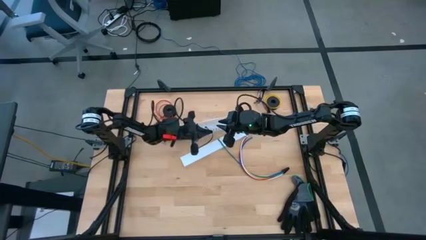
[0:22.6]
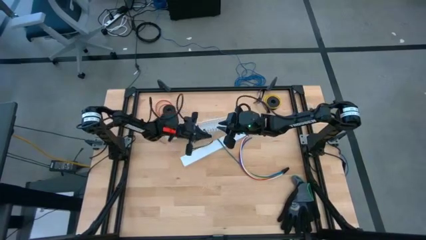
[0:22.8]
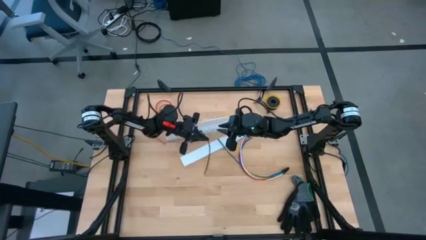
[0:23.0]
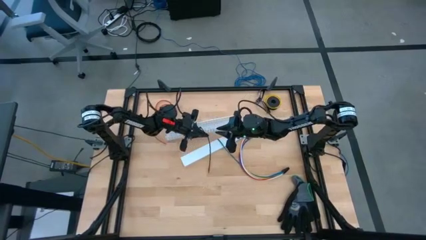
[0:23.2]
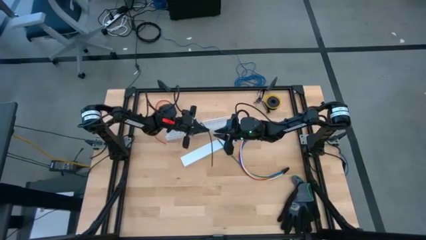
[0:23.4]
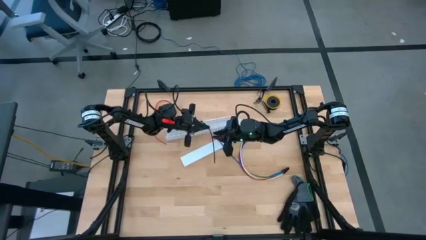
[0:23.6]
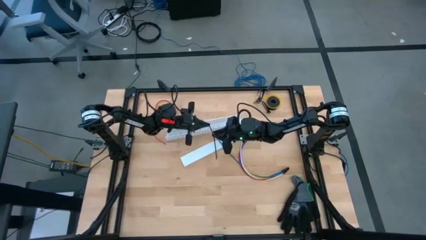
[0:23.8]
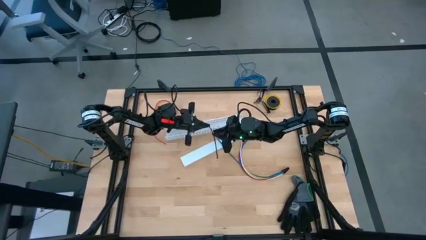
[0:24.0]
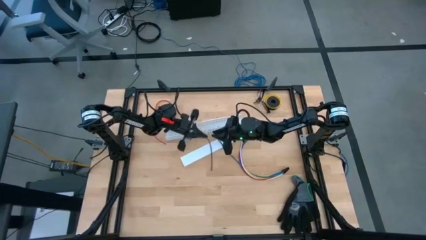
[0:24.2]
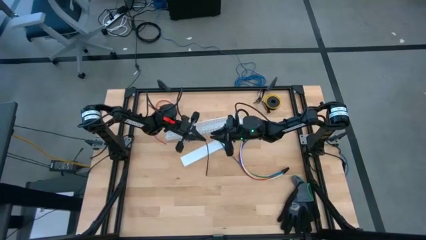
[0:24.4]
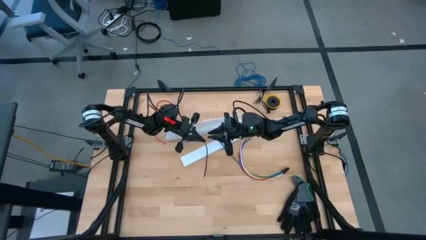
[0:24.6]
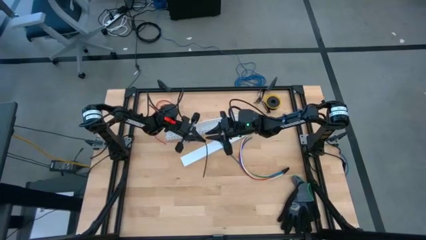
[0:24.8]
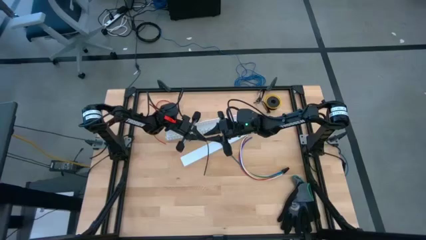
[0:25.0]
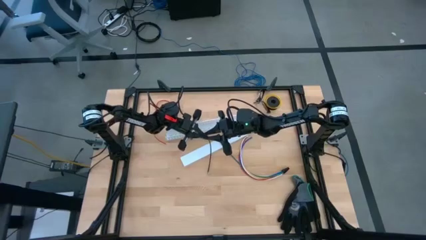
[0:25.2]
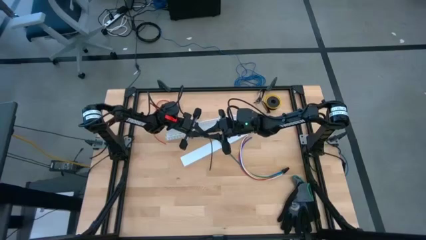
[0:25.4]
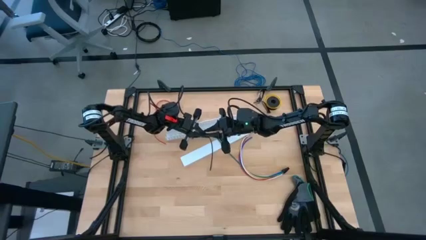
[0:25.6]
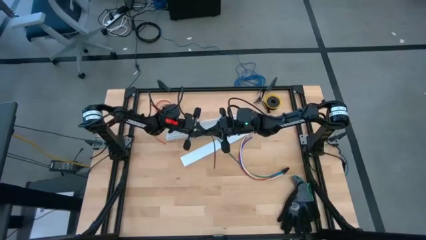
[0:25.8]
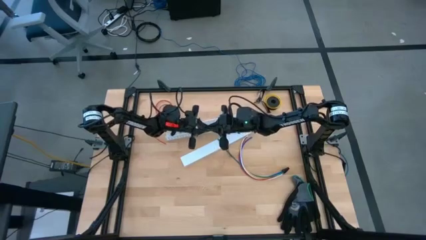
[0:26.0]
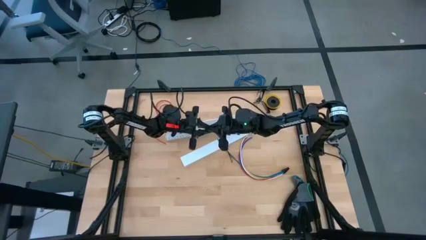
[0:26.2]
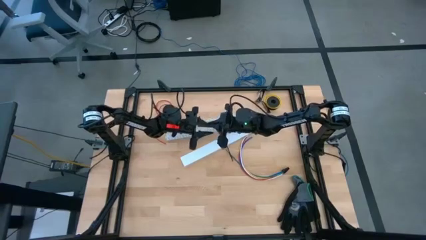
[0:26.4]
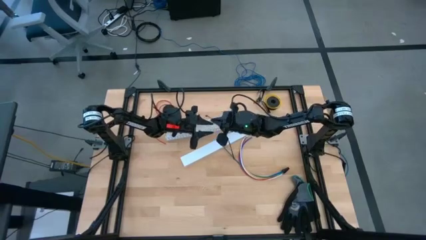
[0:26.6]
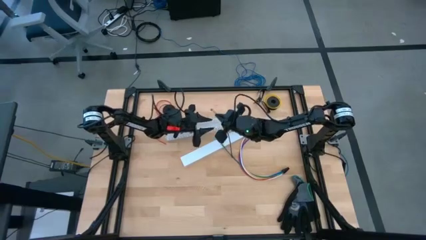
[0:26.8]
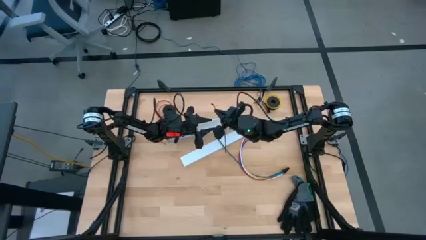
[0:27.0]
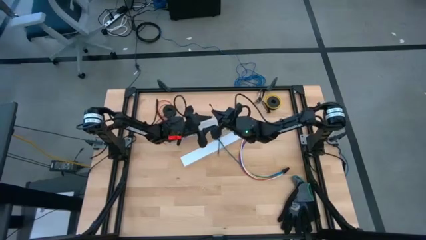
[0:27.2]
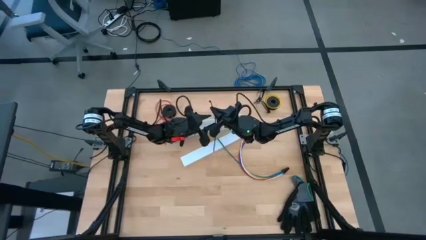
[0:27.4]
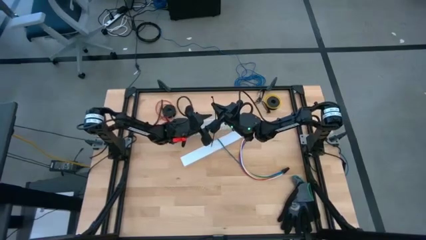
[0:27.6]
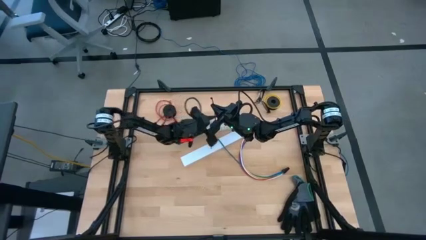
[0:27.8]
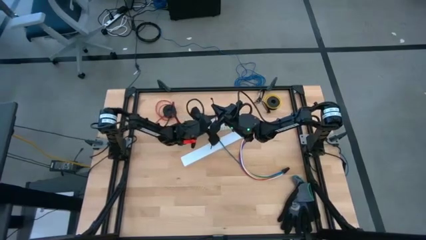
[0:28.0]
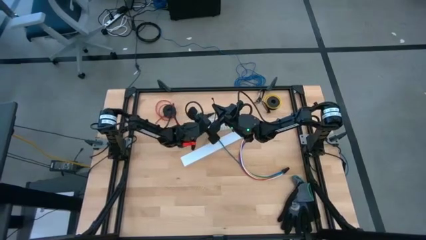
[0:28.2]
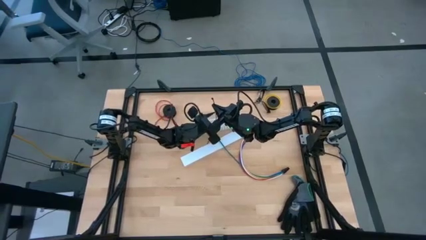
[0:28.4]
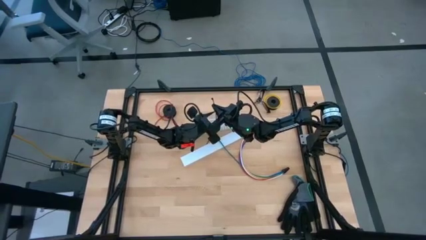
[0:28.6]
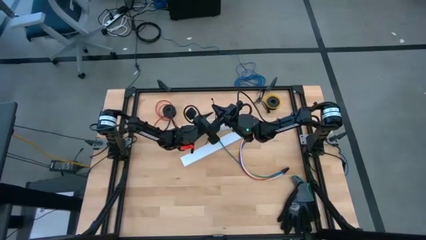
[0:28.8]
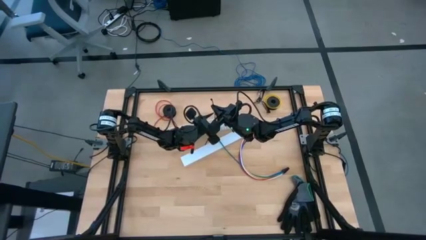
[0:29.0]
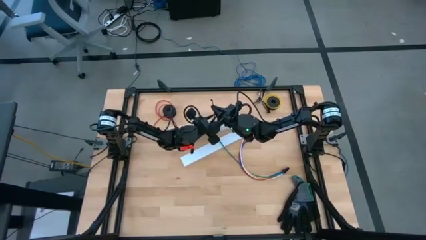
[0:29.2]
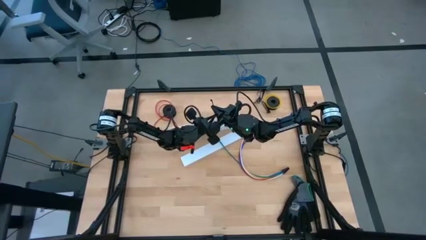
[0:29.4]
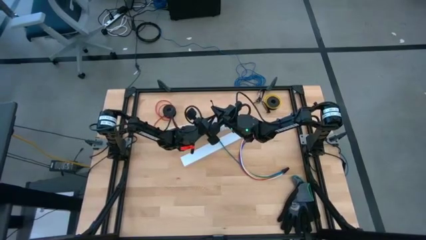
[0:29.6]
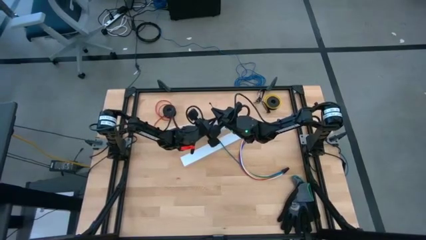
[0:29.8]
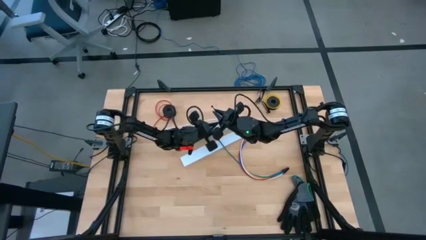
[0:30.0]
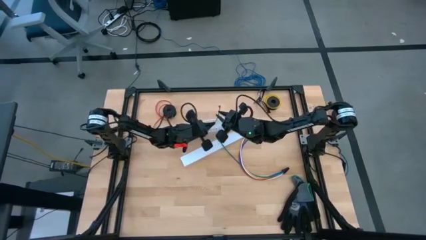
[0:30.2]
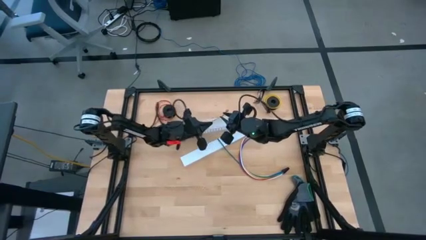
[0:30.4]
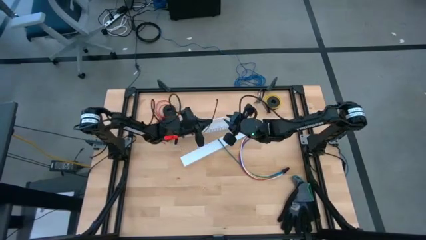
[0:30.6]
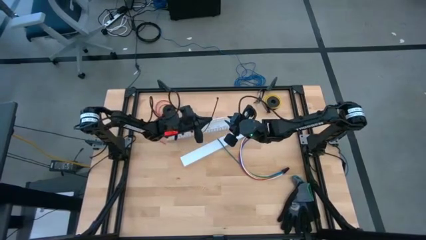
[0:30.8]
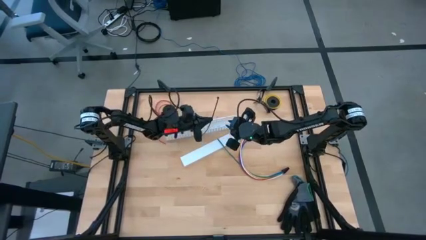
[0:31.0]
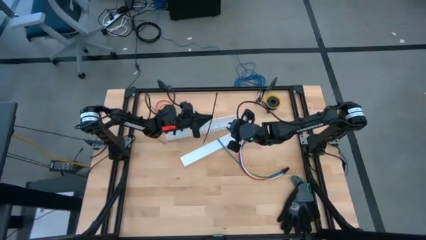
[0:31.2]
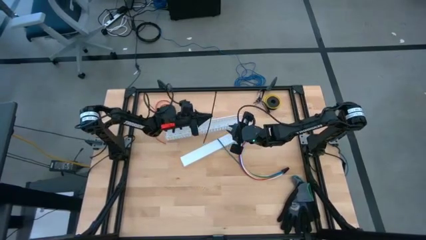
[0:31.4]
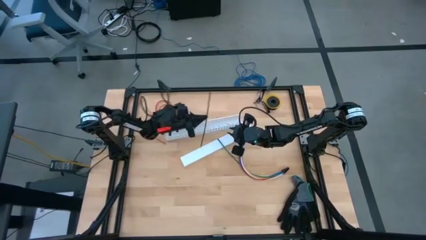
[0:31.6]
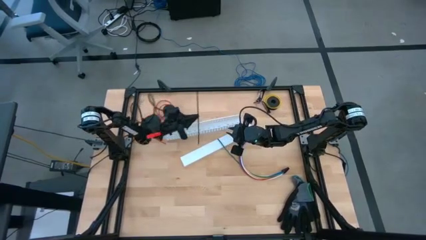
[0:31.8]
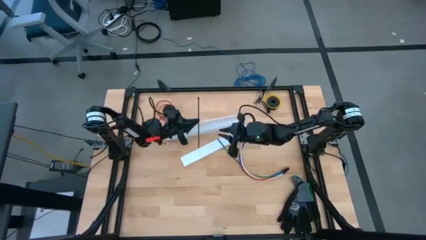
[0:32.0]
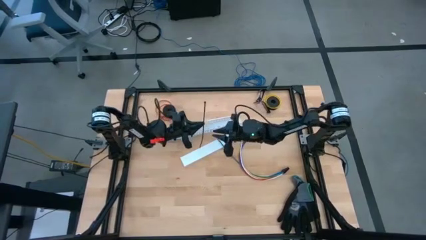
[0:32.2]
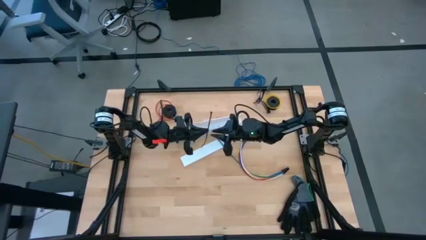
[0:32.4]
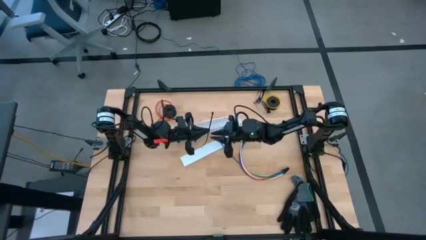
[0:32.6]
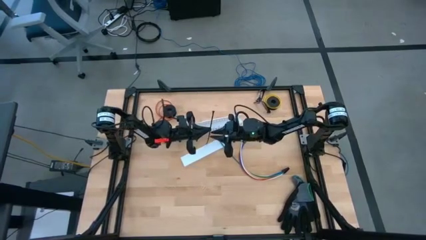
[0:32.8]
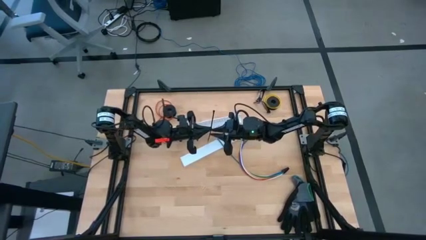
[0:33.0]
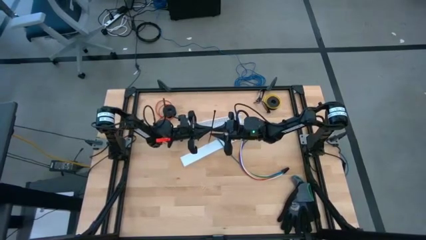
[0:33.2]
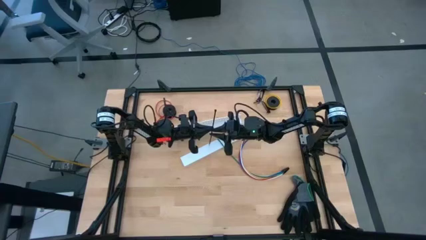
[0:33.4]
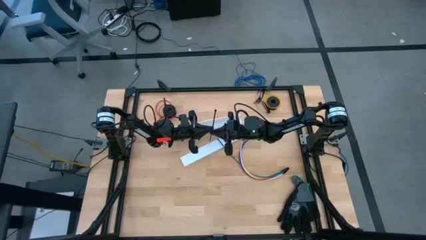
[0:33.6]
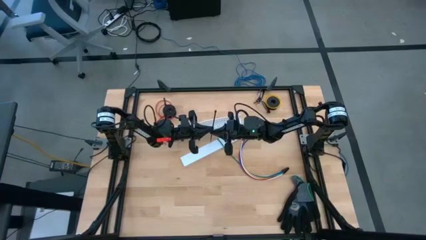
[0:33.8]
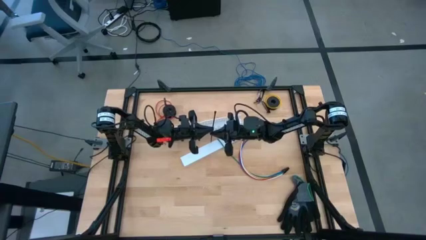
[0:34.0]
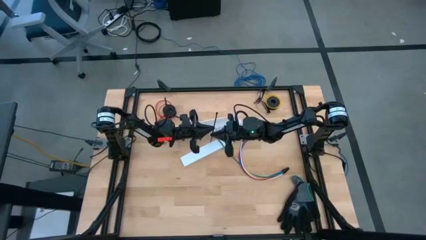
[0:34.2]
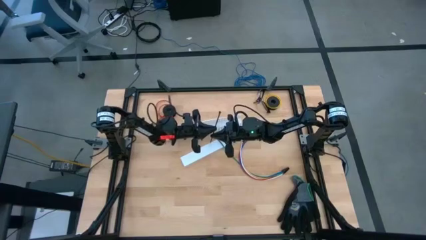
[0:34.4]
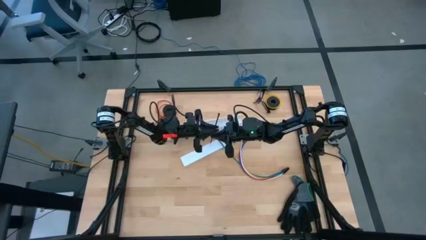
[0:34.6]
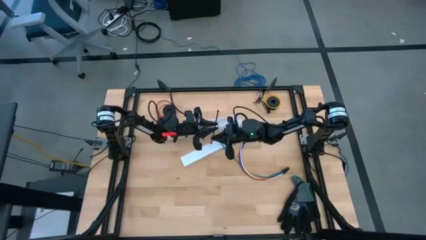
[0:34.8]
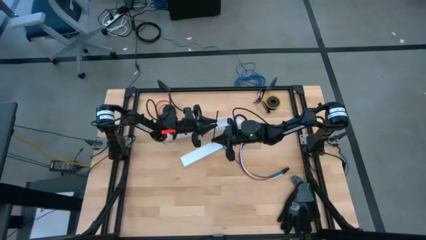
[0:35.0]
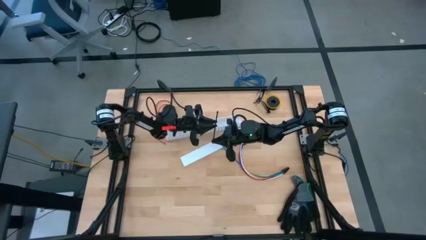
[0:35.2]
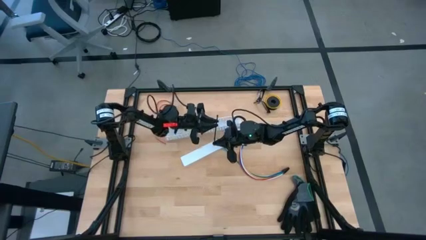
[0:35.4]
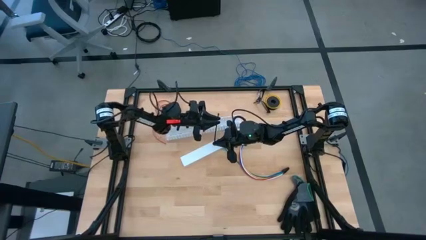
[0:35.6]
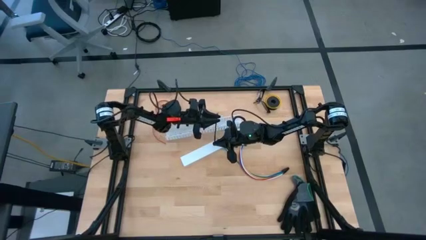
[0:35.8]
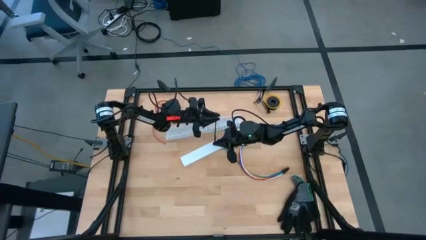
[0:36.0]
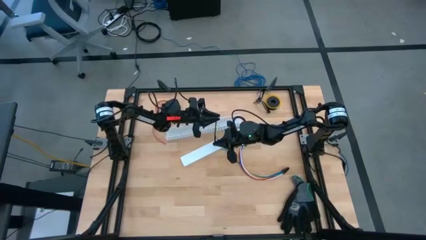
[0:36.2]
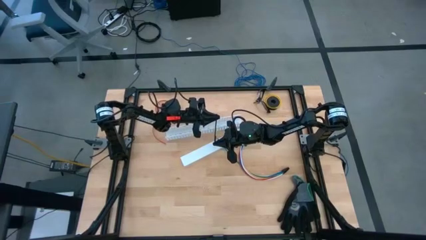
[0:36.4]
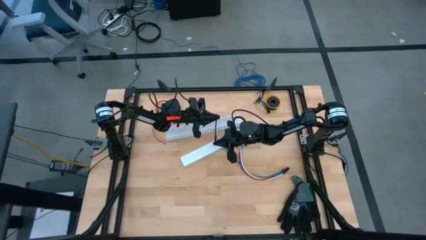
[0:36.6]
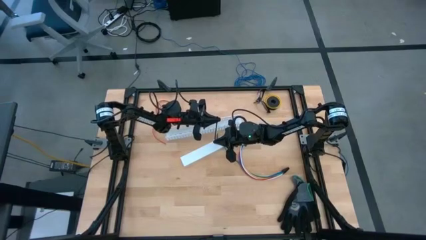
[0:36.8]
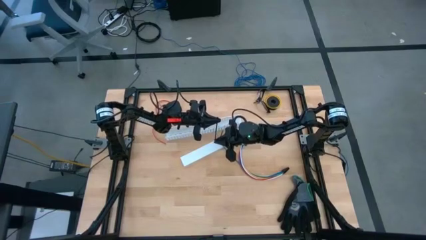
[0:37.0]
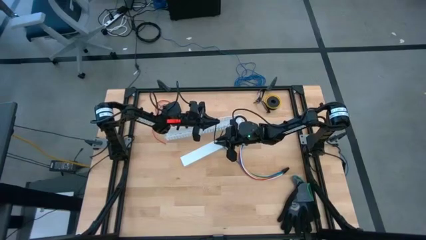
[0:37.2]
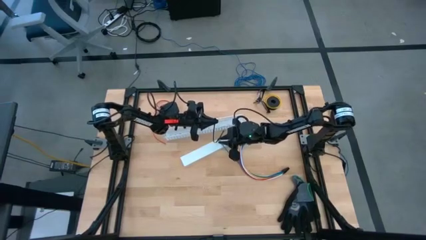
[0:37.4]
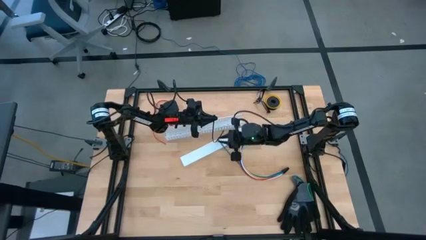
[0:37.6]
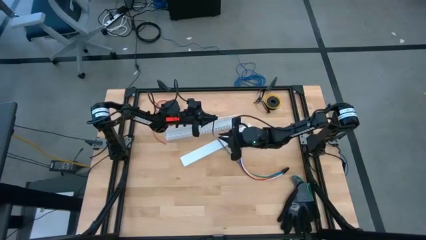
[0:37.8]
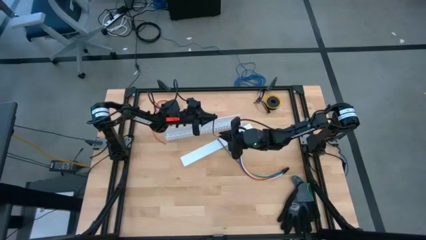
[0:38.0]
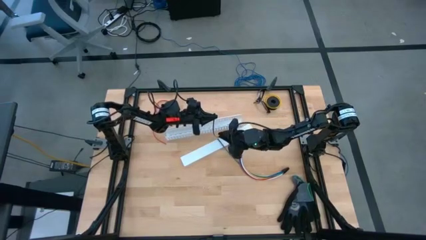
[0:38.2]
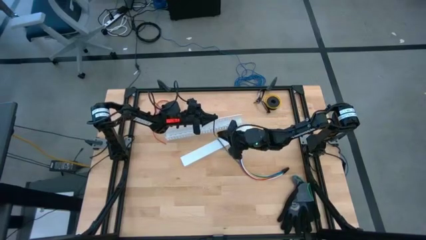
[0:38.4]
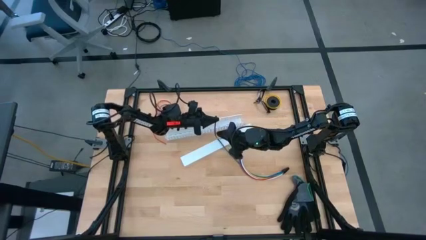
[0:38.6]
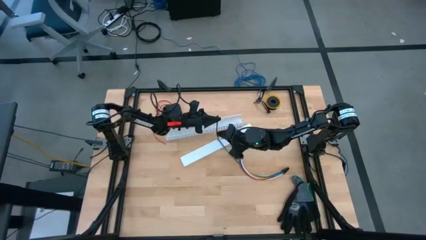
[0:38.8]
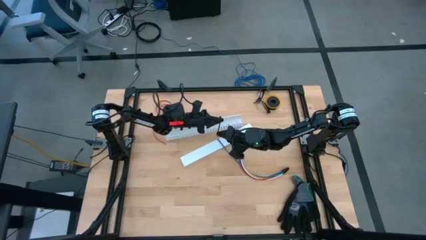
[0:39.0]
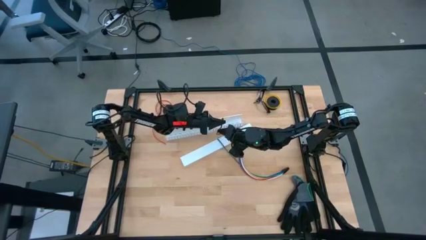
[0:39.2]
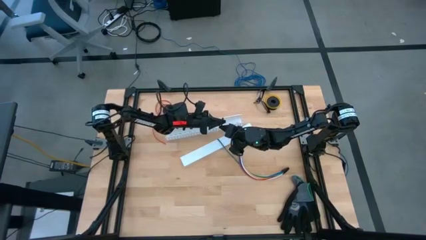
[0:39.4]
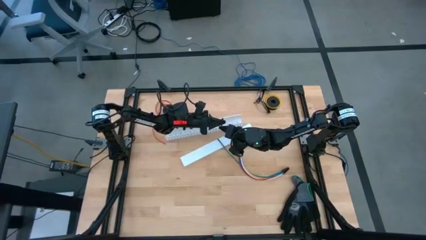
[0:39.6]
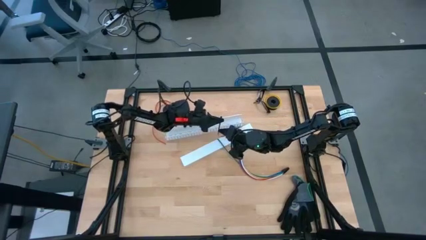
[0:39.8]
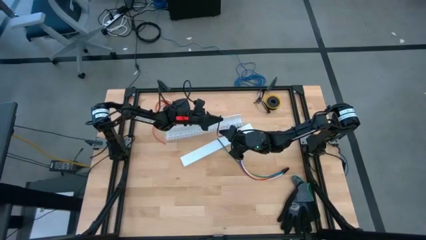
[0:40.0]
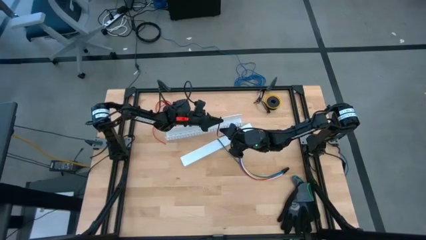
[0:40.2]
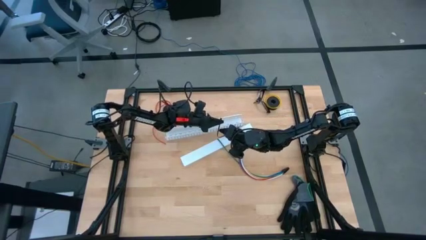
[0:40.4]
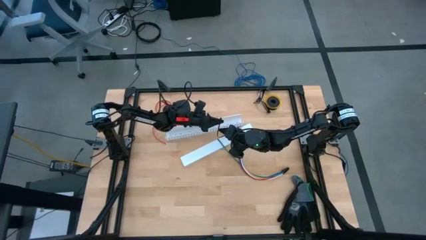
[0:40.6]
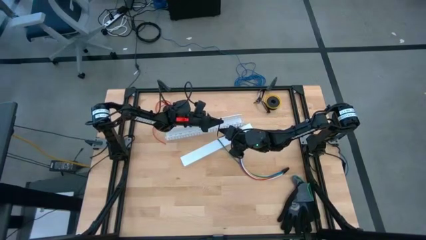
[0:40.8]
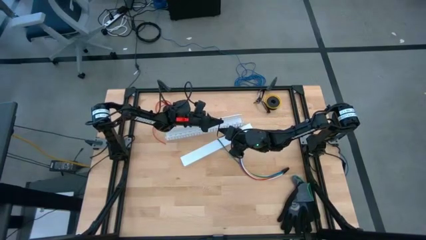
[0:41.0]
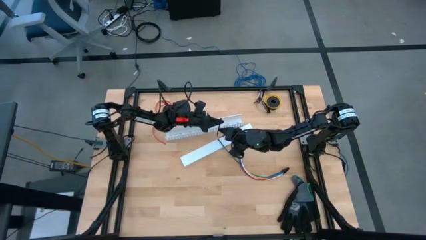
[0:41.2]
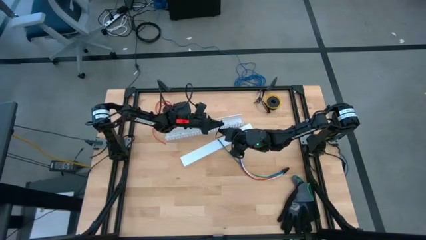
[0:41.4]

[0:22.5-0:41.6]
Task: Ziptie cables
Prepare the black zip tie
